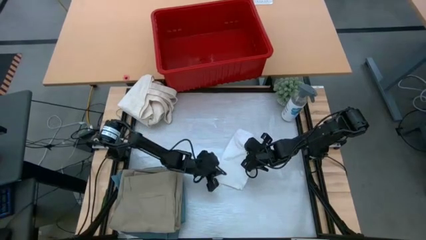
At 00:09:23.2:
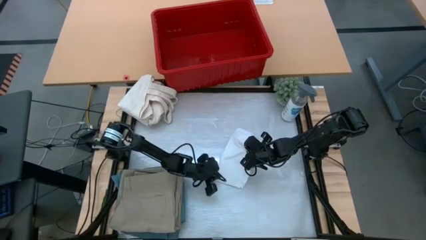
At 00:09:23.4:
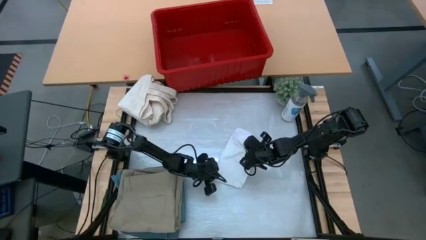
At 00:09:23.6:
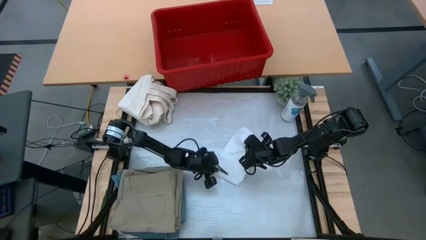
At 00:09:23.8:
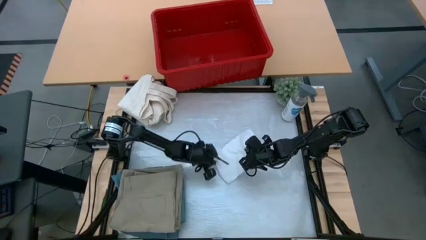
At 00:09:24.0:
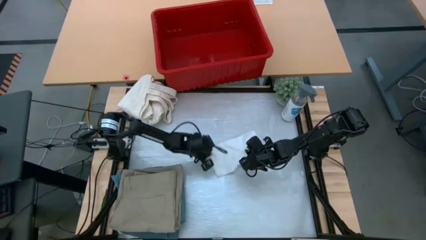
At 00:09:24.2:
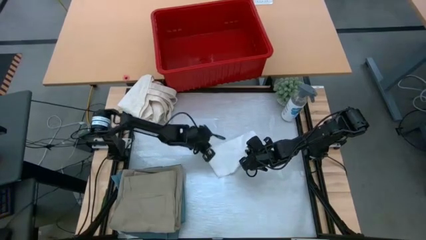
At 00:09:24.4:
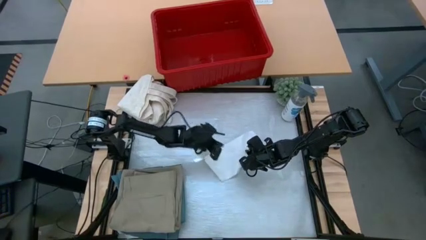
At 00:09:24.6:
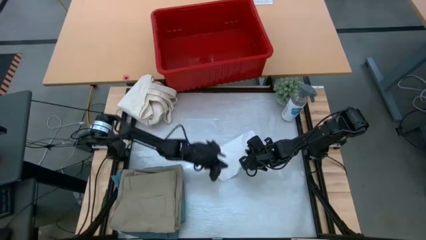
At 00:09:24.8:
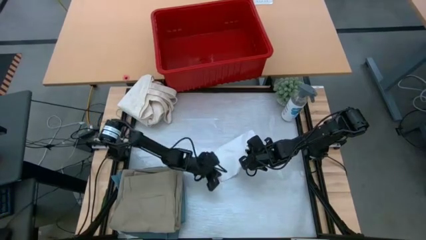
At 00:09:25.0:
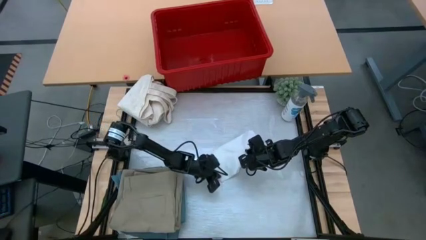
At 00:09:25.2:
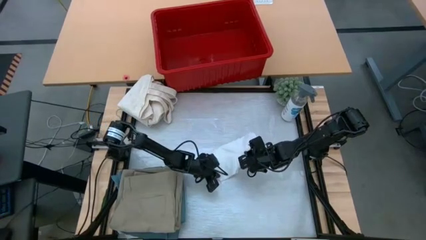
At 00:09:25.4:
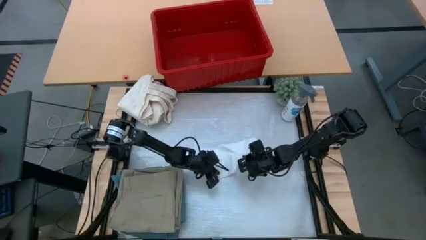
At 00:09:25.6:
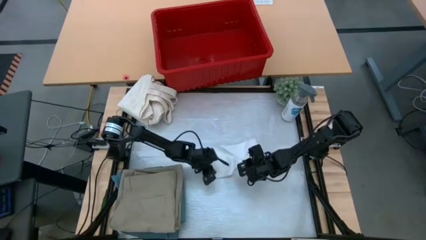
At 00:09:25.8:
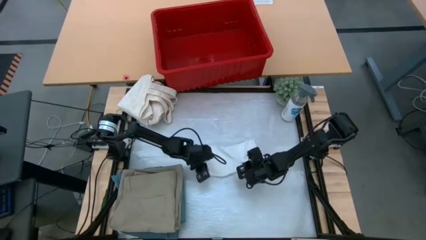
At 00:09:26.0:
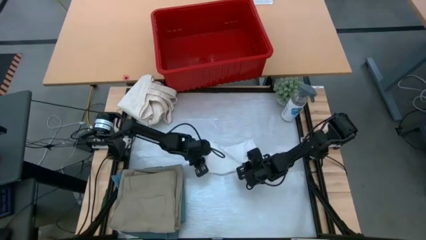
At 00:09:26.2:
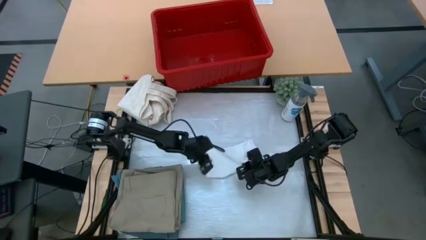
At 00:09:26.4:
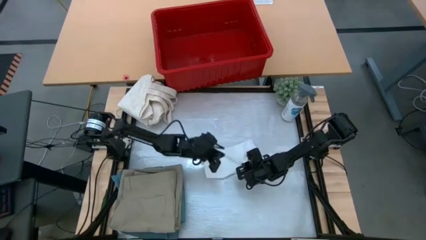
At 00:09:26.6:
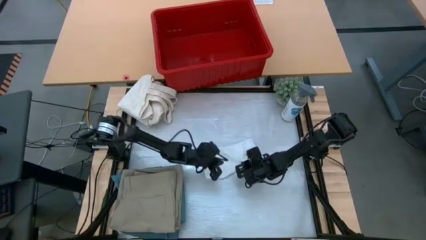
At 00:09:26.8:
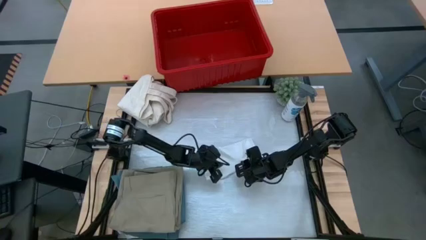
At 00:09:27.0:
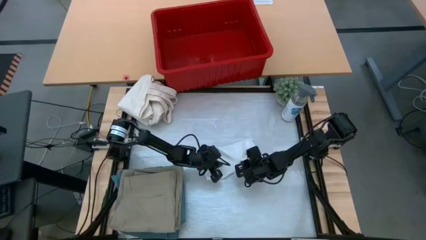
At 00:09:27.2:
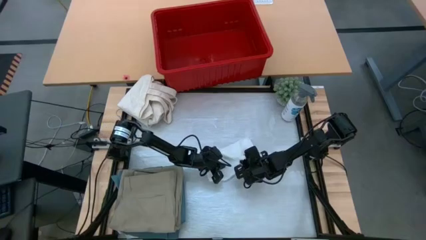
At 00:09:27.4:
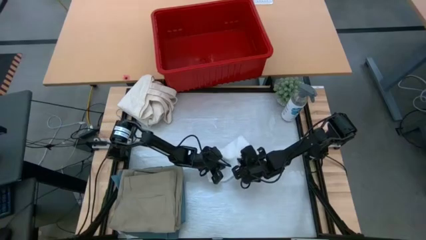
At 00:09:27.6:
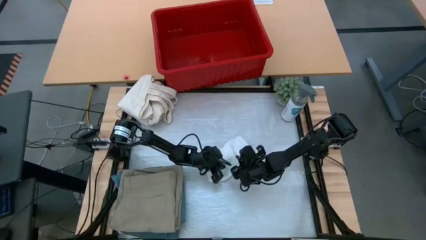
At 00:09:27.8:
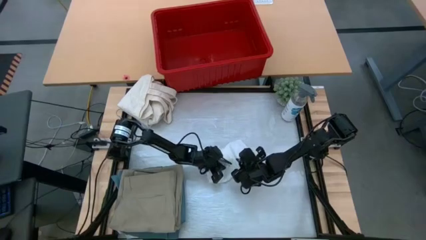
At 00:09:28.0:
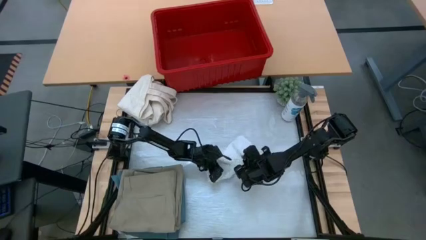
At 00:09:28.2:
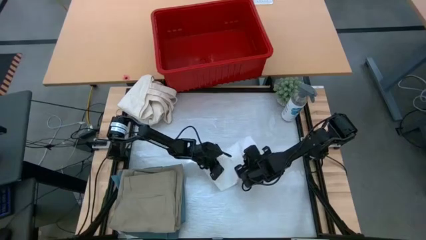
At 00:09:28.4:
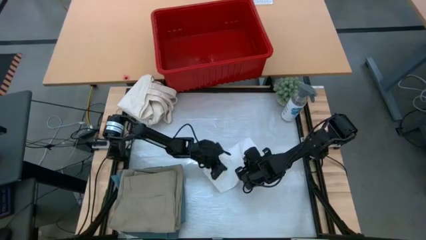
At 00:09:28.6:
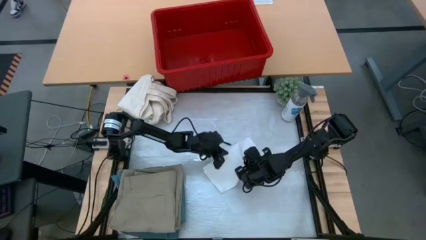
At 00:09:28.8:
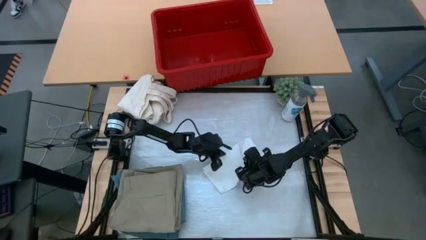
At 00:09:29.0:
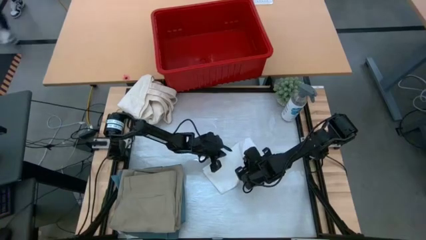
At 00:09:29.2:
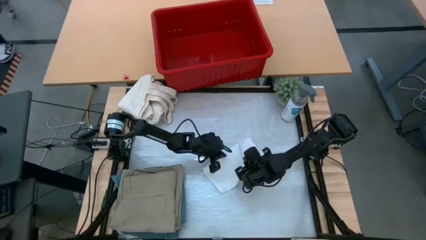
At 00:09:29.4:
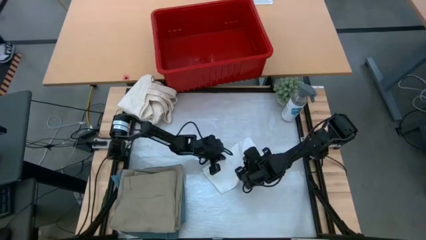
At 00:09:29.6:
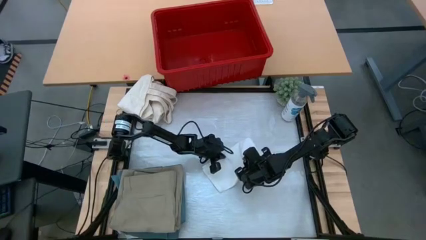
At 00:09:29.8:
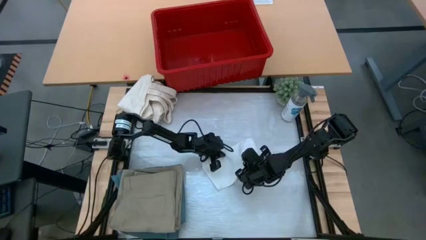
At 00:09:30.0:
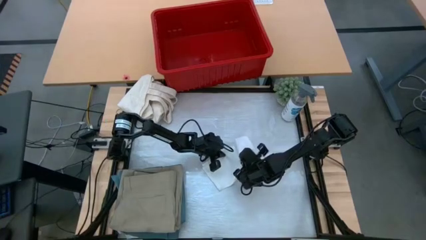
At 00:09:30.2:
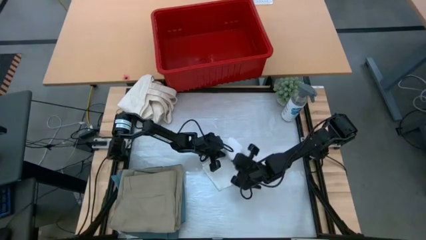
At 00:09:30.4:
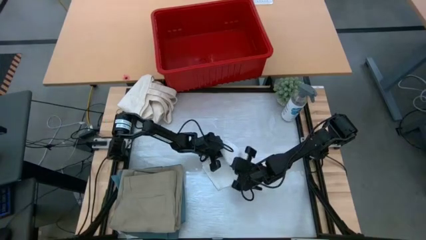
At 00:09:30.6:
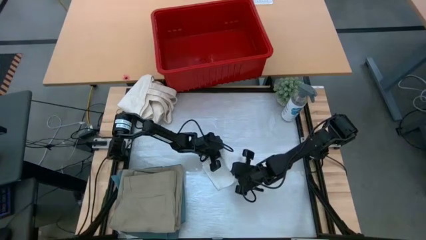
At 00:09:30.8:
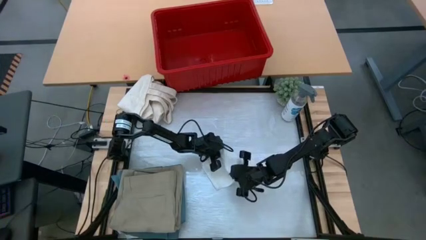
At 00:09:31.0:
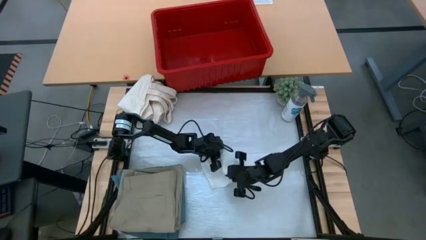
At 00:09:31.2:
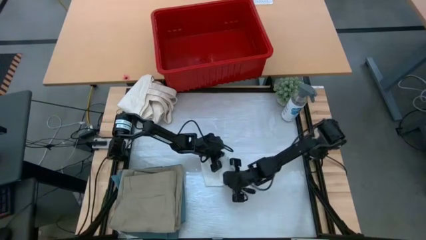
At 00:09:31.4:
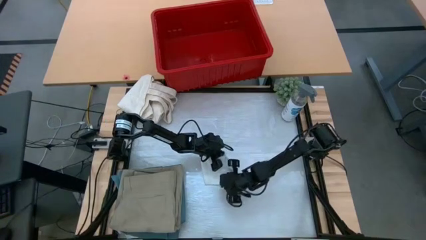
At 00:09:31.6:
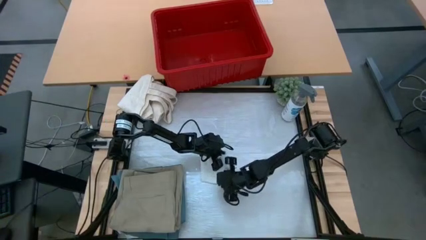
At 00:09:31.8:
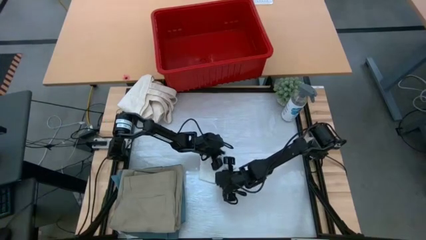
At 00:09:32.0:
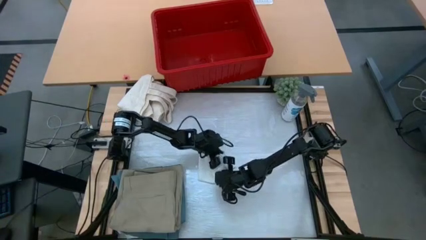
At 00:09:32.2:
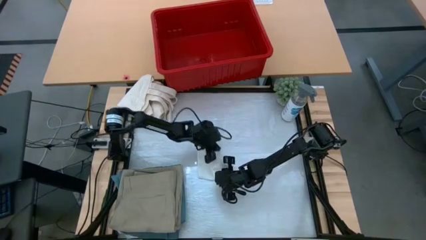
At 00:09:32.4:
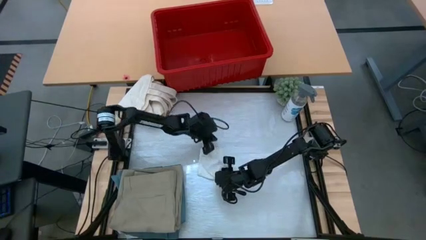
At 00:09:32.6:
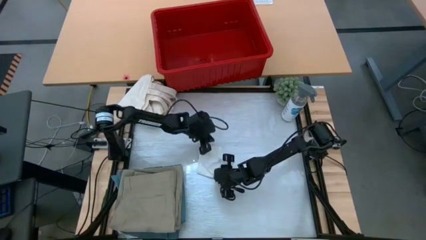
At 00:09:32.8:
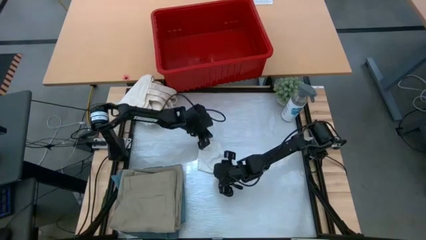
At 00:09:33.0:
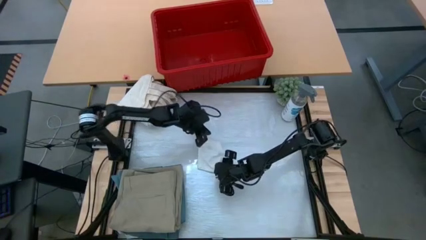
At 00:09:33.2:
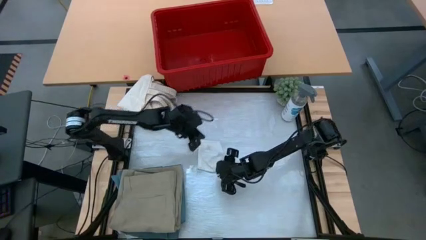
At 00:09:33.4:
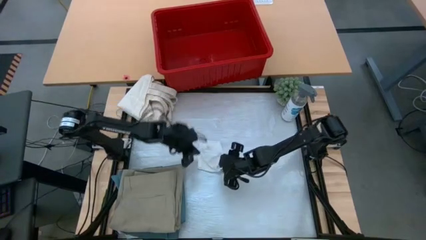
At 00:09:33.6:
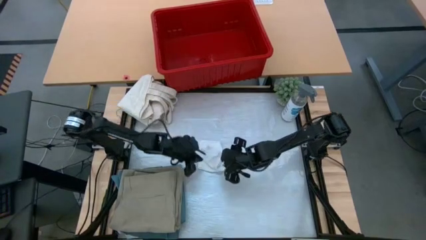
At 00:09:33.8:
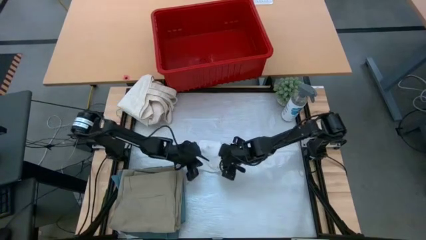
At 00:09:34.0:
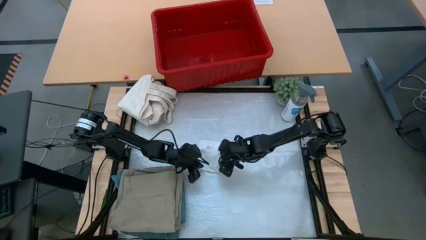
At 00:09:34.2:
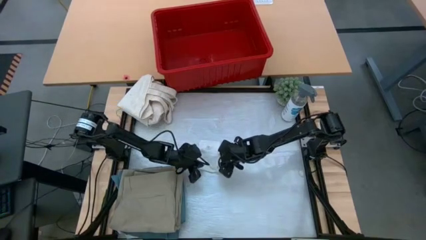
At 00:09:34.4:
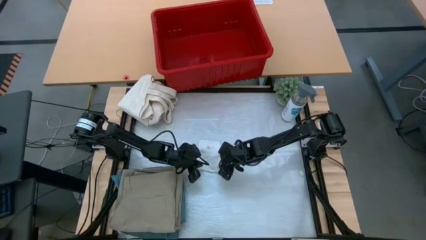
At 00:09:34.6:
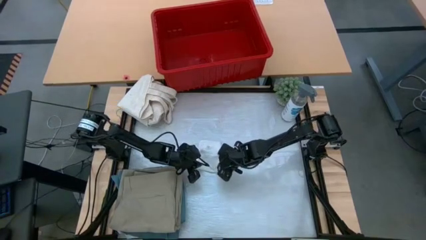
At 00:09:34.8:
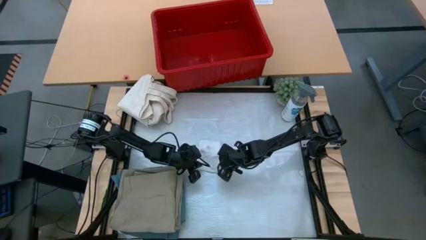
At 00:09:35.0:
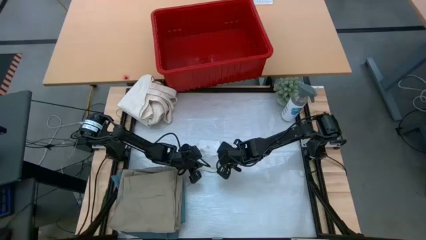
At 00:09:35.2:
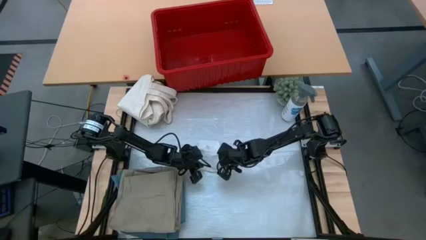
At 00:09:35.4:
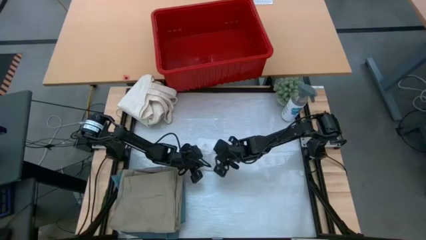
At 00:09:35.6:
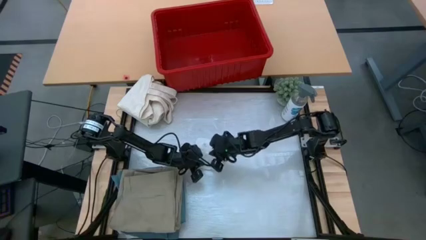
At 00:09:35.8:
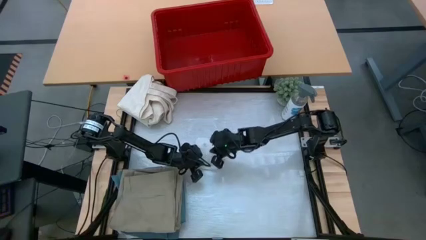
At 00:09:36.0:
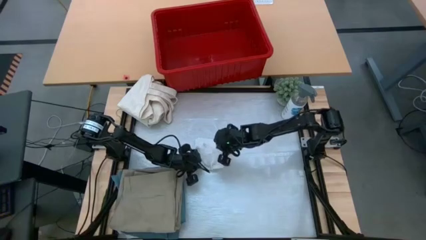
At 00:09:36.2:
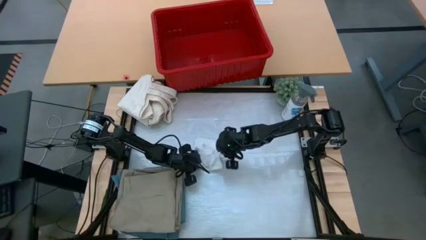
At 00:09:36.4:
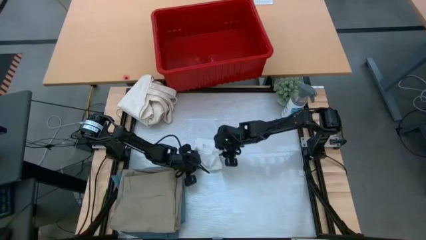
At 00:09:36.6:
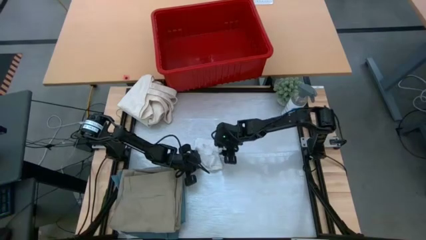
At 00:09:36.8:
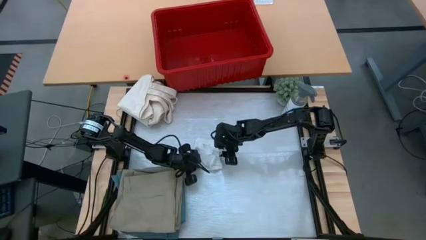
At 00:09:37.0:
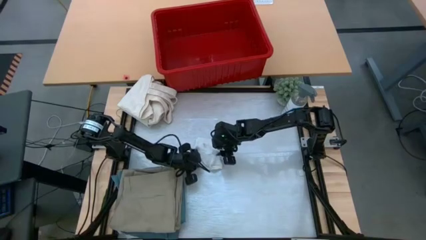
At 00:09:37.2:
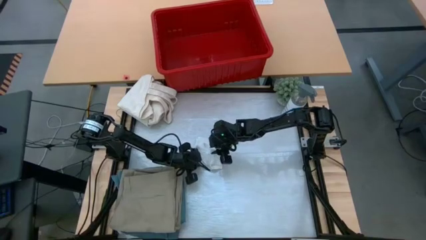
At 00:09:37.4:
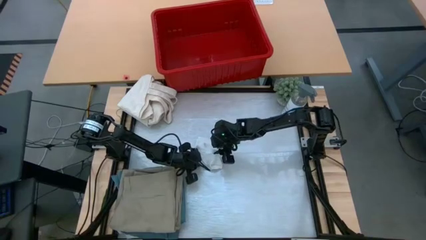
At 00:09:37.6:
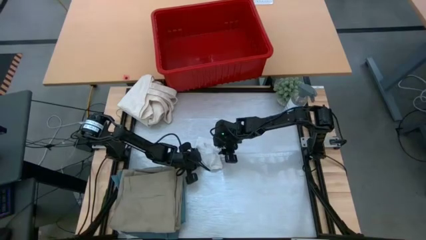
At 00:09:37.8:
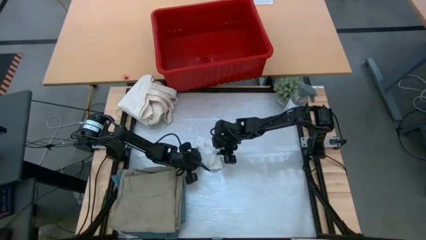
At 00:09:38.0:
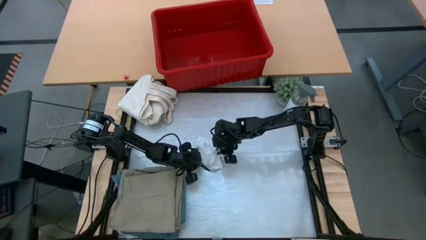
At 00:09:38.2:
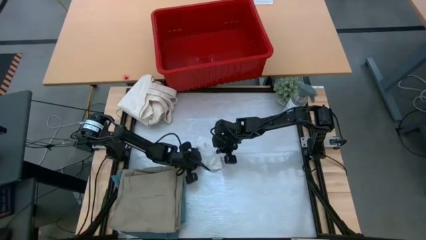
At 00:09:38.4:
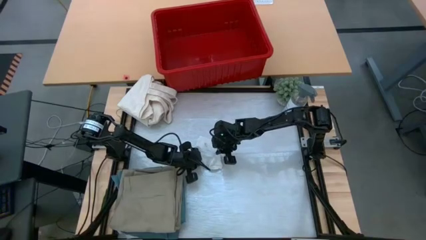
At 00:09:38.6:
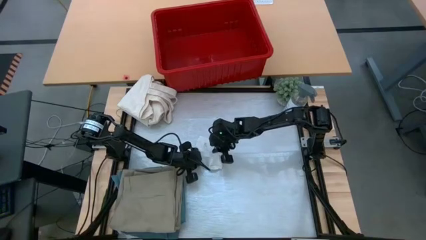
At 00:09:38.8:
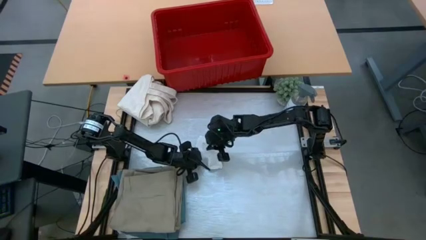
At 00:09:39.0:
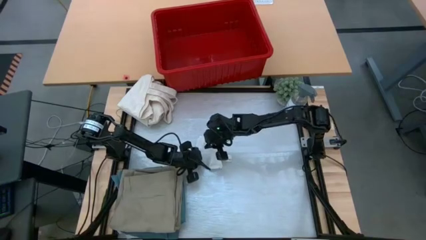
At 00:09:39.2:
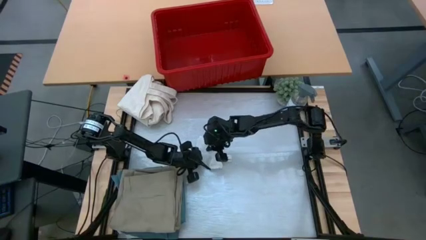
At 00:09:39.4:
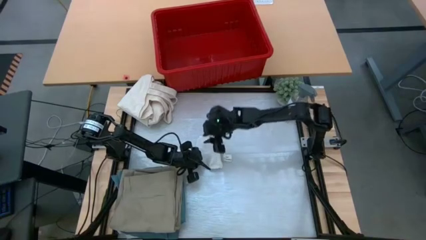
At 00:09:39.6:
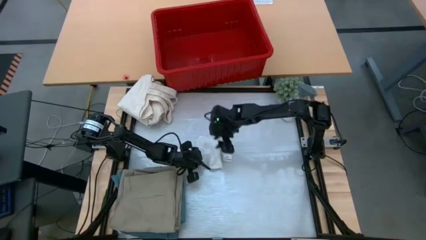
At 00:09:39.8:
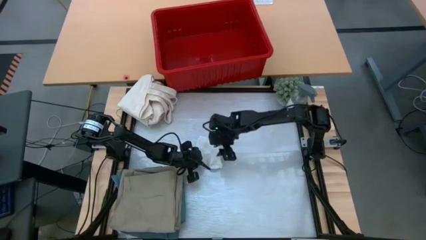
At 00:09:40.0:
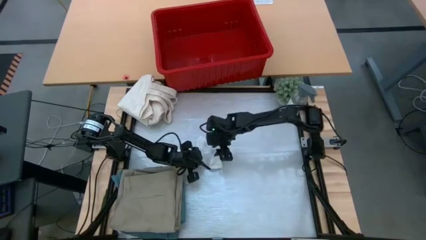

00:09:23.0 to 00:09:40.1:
Task: Fold Laundry from Bin
Fold the white underwear
